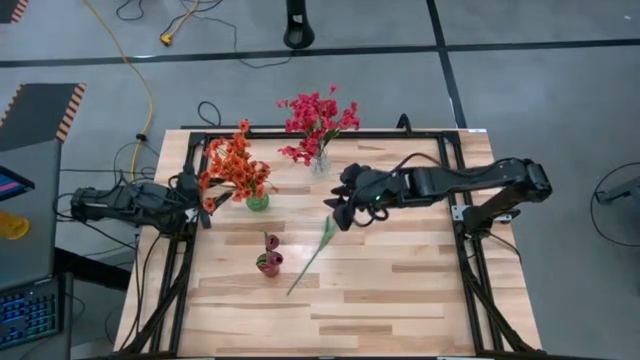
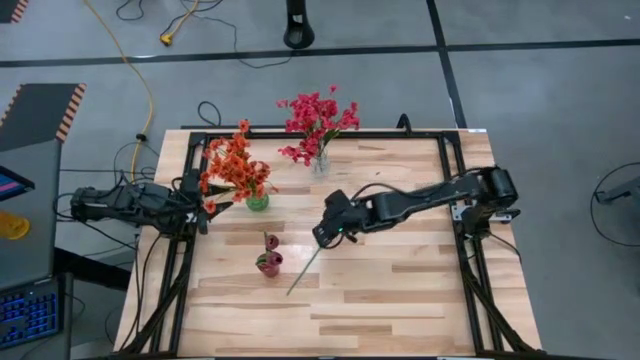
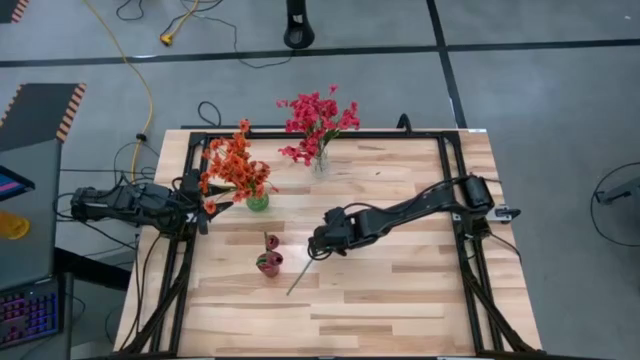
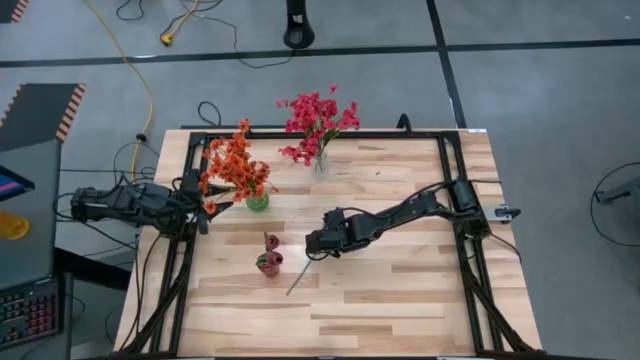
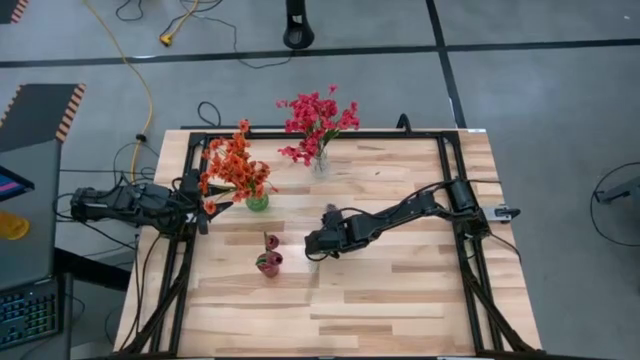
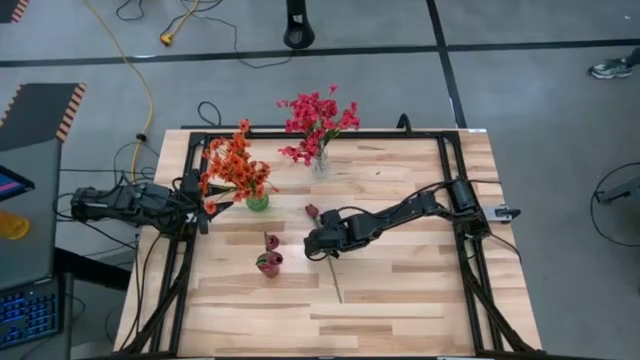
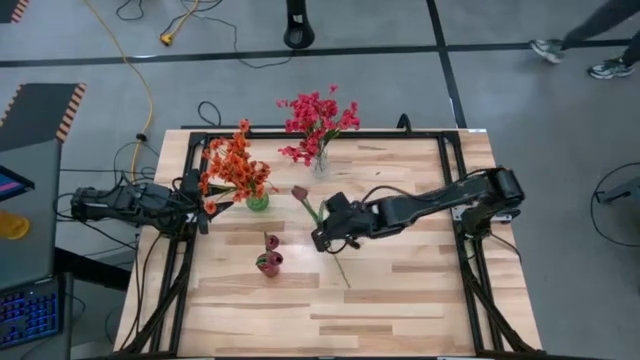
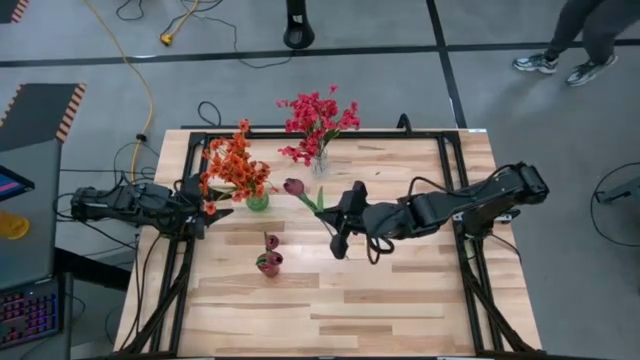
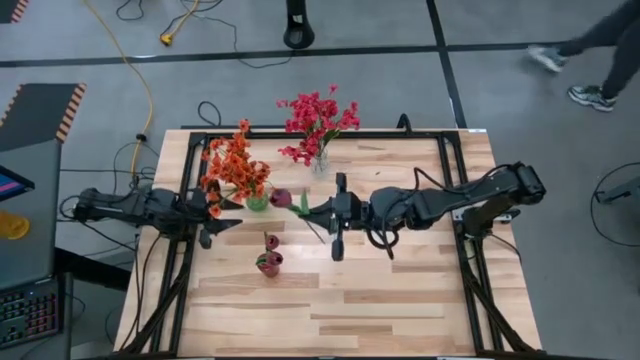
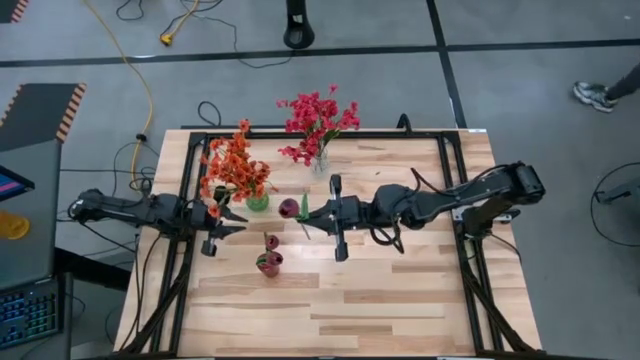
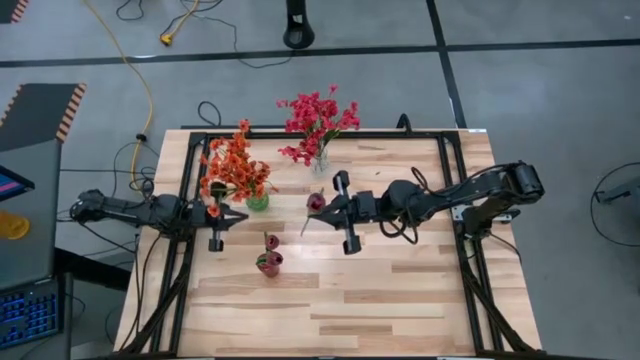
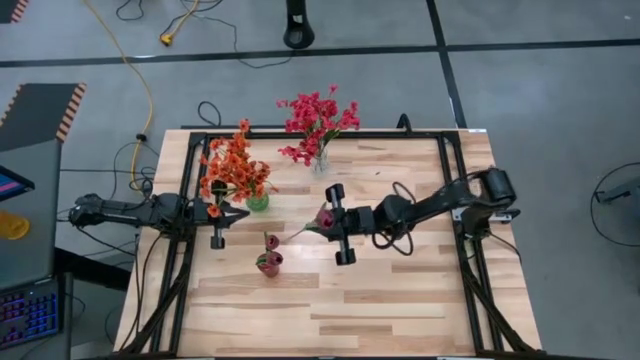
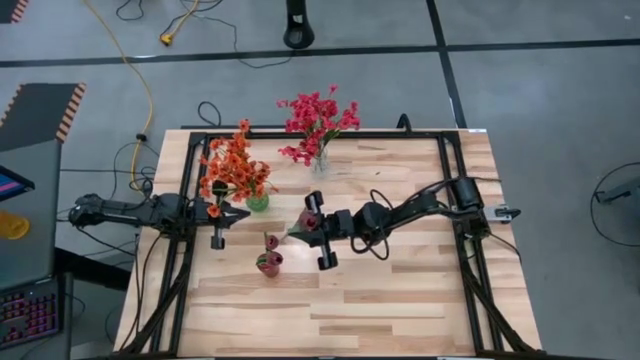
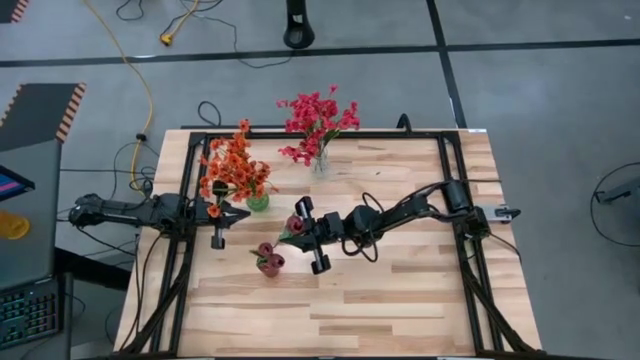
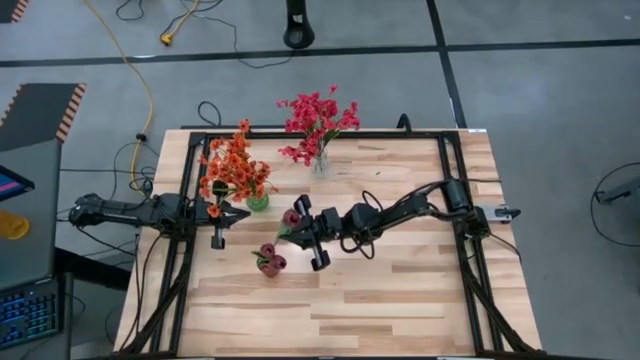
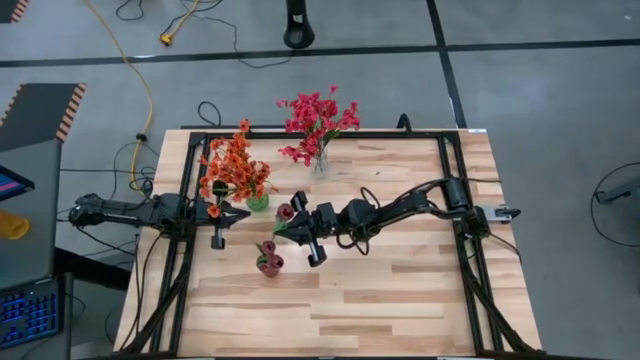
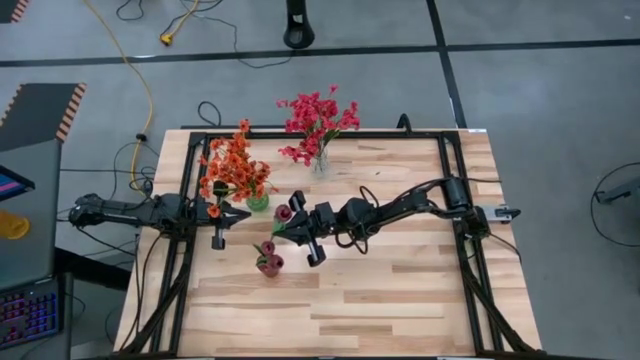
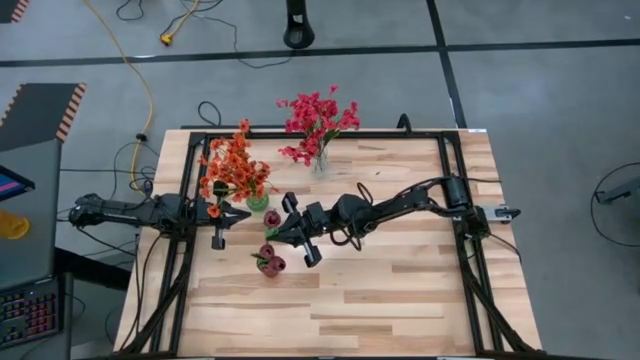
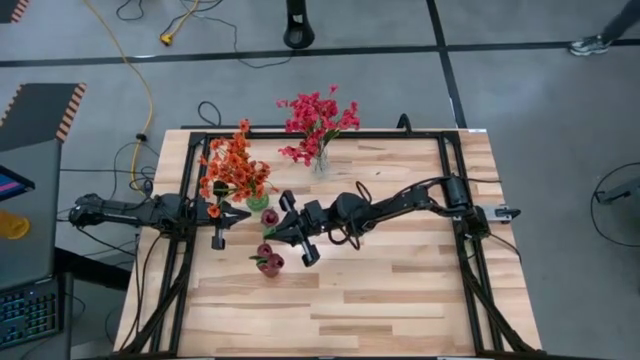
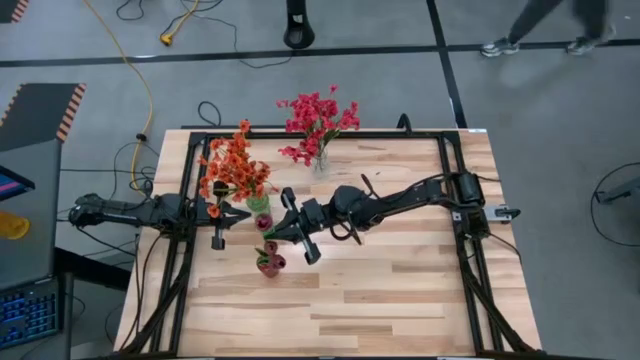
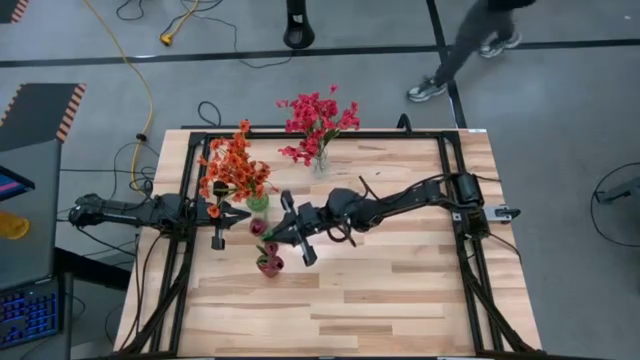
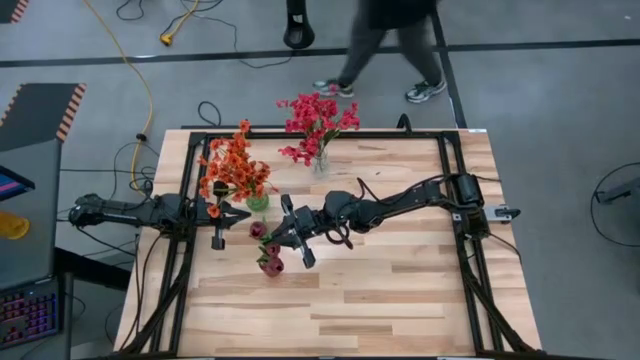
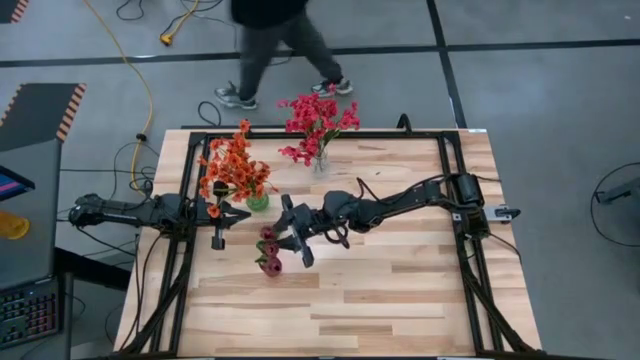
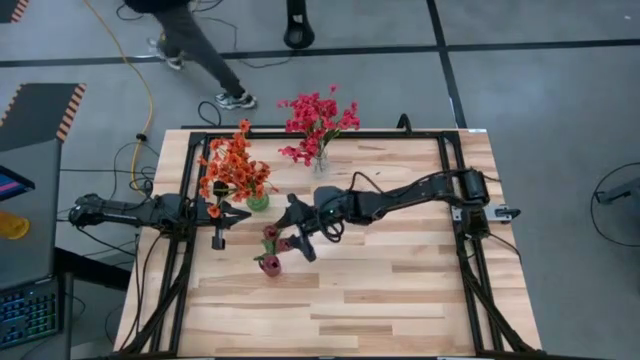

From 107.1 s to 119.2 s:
Task: Sort flowers into vase by color
Put the red flower into the red vase

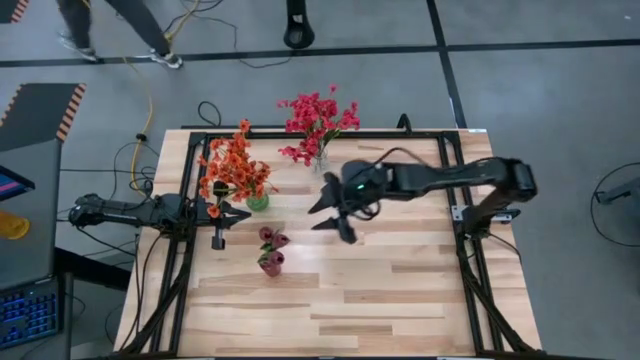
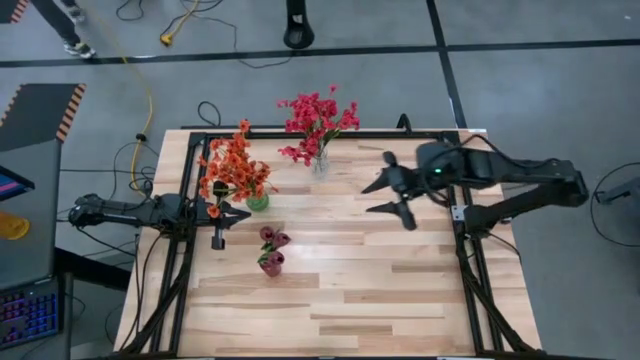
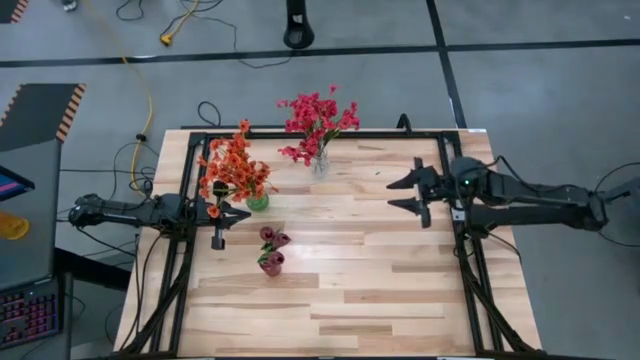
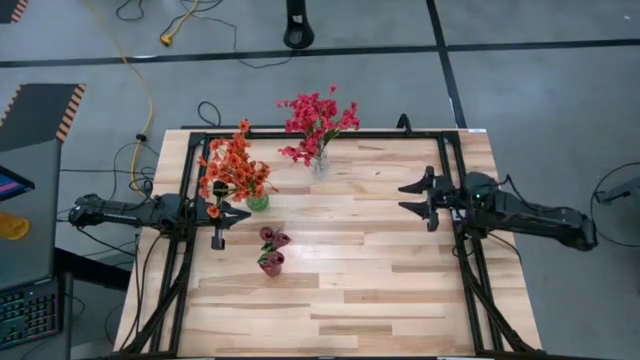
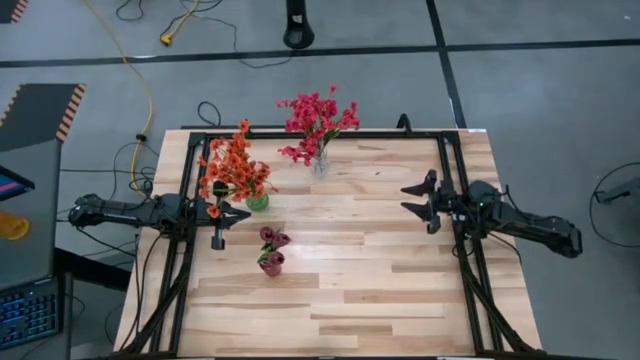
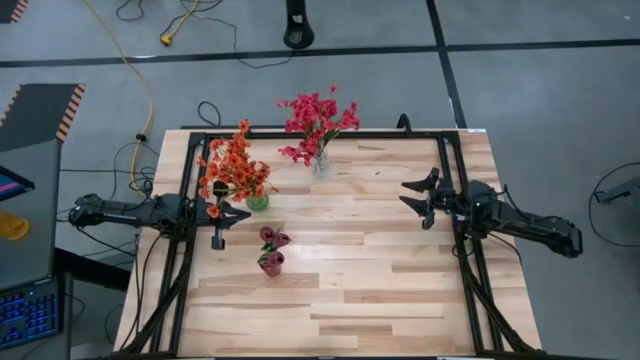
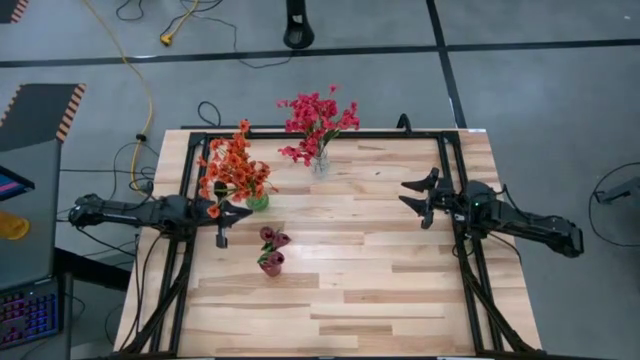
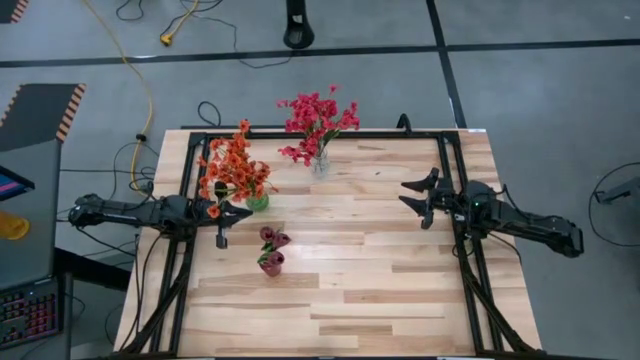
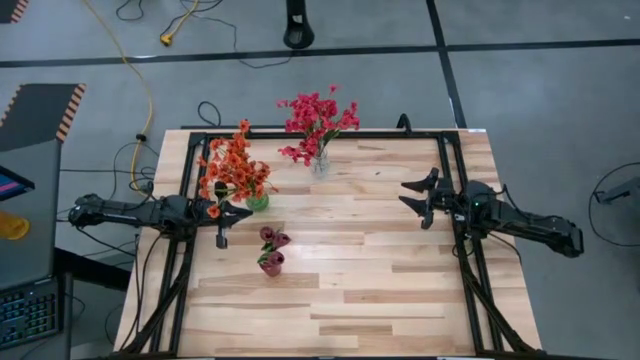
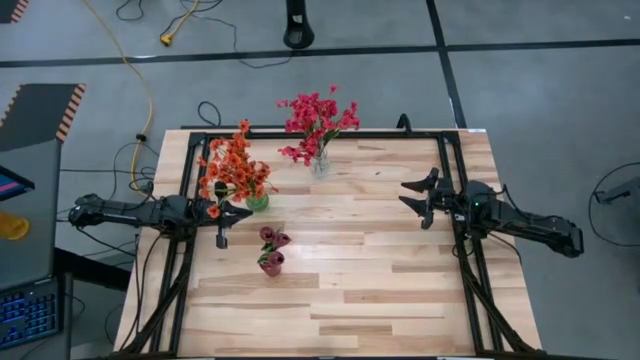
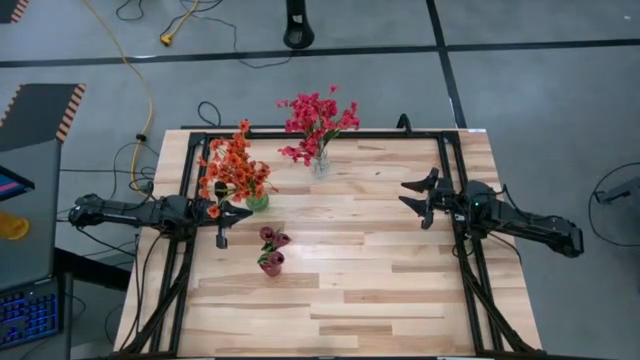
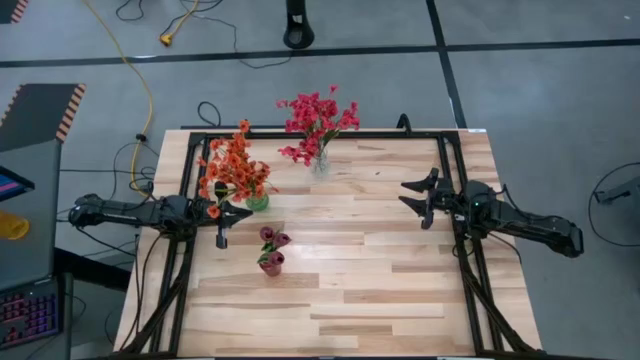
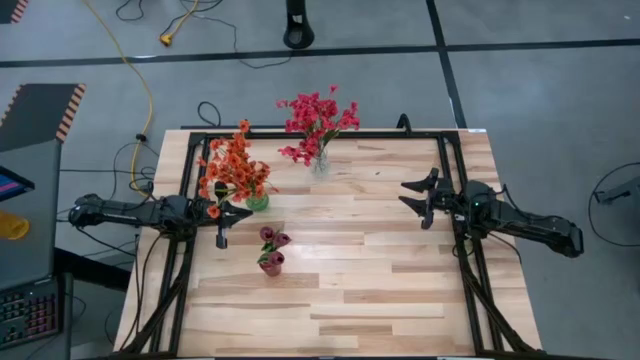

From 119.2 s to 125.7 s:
Return to Home Position
